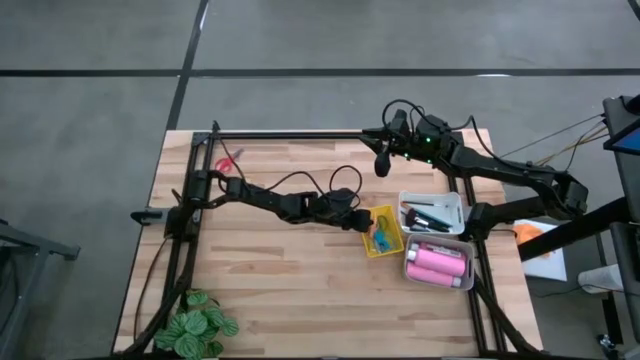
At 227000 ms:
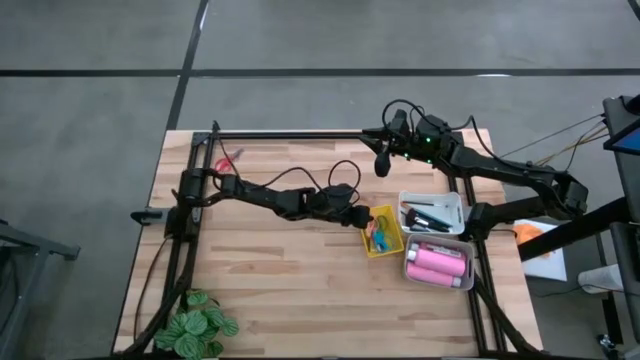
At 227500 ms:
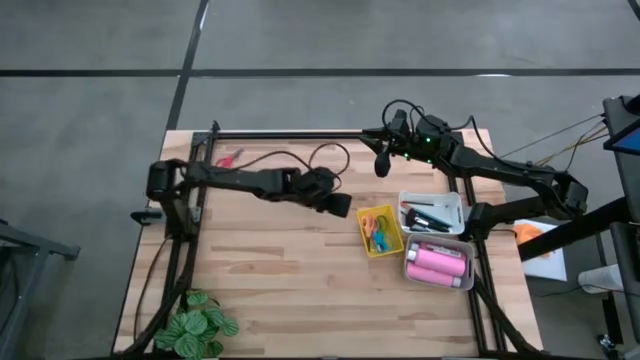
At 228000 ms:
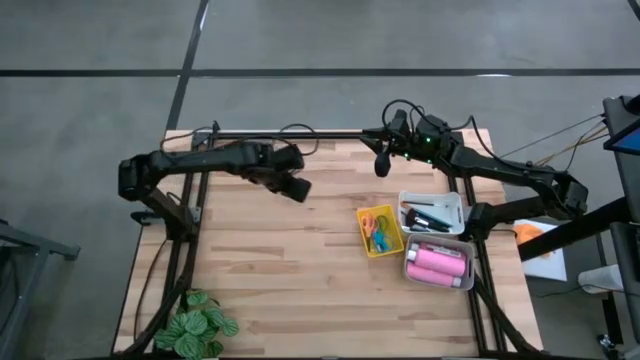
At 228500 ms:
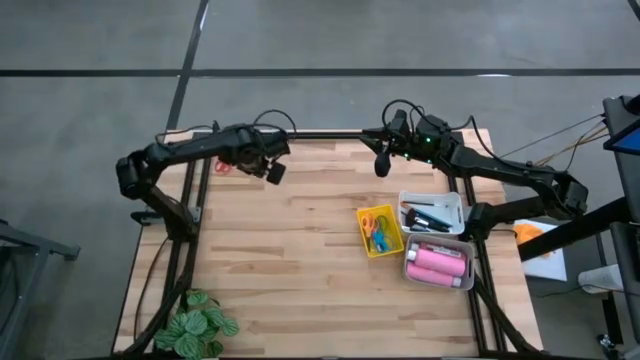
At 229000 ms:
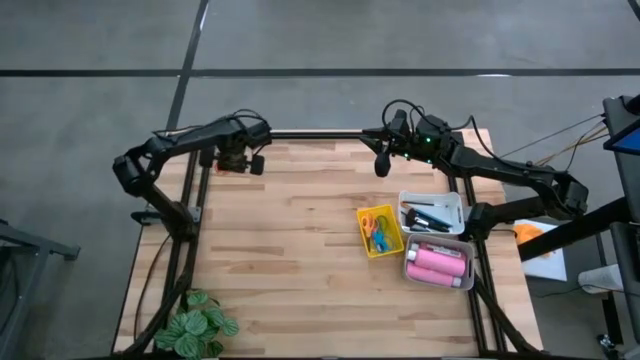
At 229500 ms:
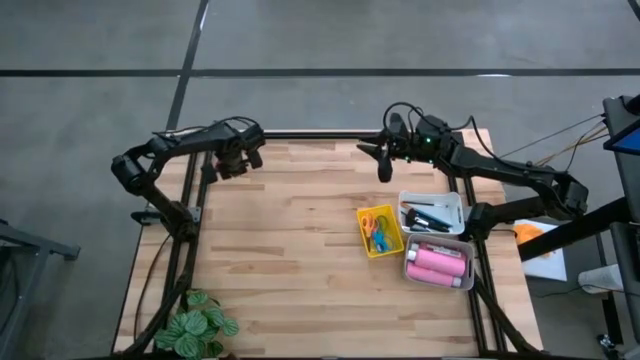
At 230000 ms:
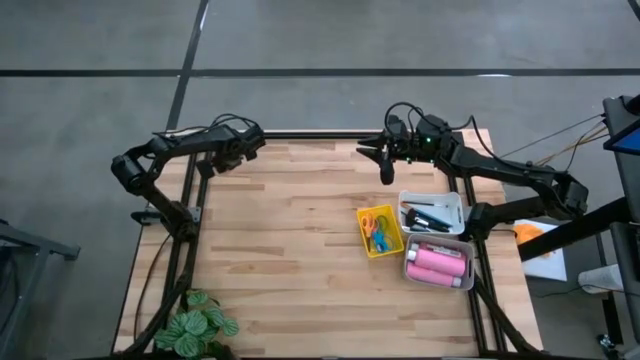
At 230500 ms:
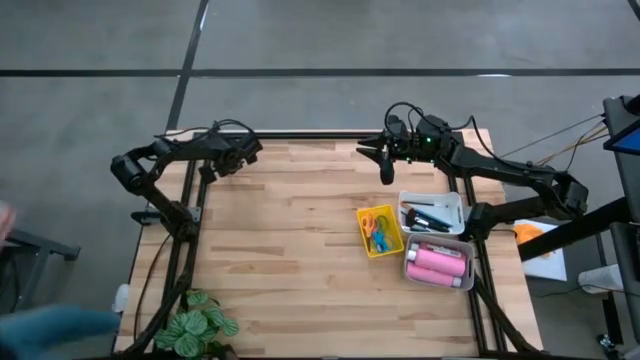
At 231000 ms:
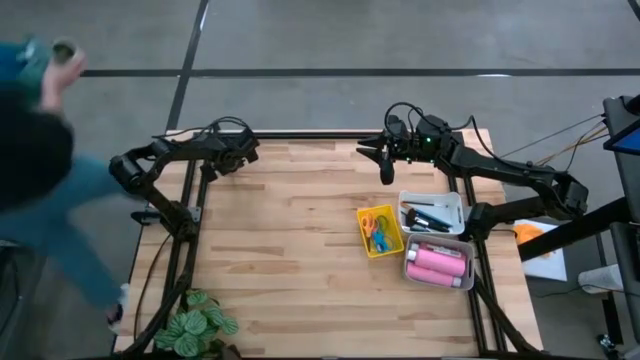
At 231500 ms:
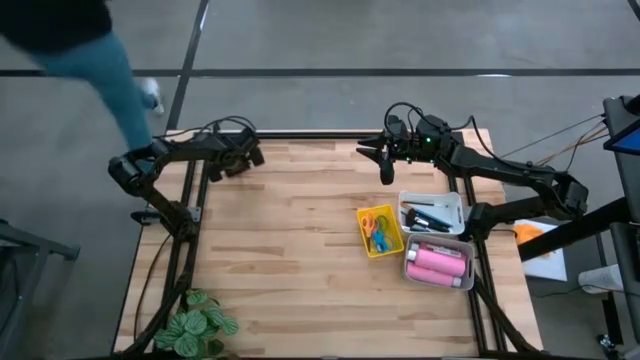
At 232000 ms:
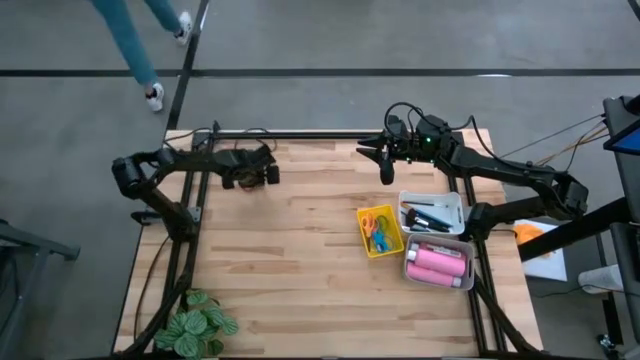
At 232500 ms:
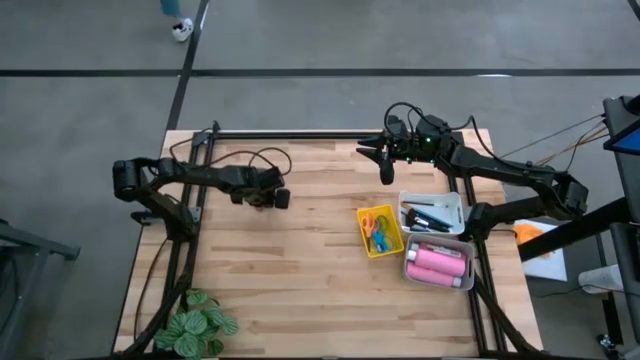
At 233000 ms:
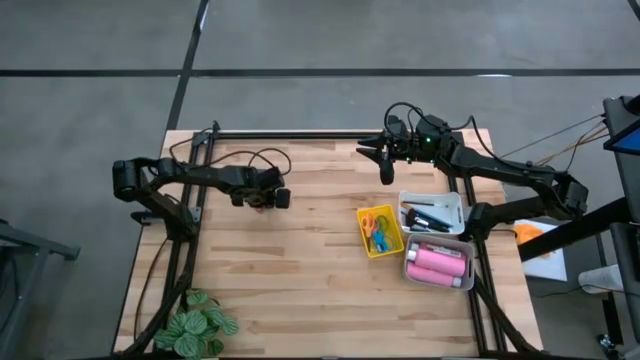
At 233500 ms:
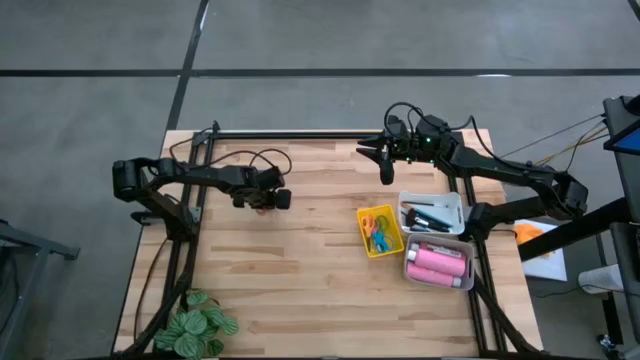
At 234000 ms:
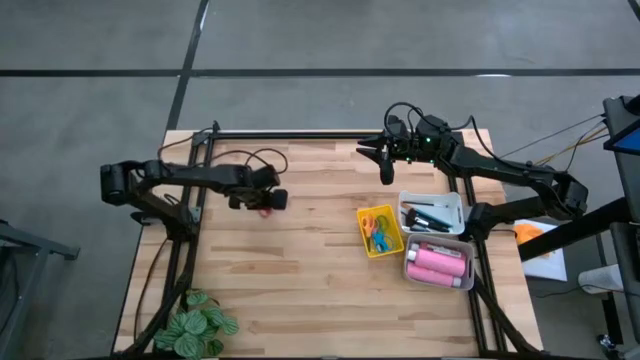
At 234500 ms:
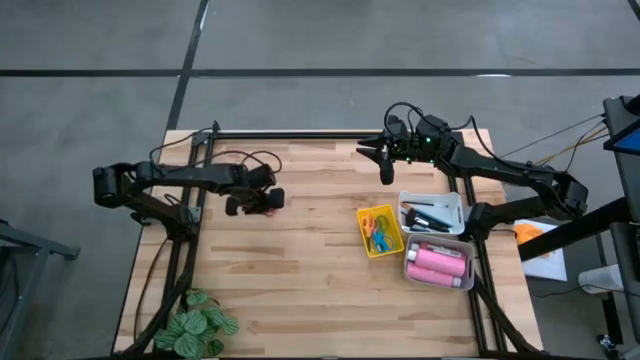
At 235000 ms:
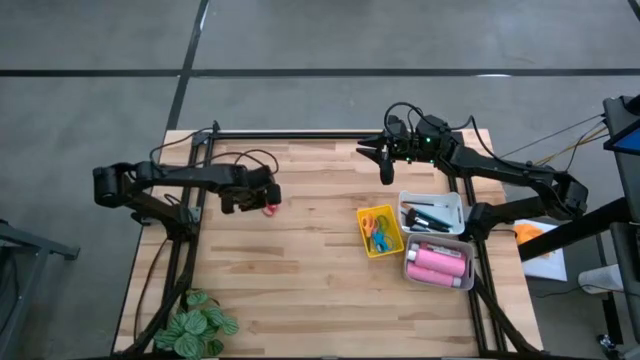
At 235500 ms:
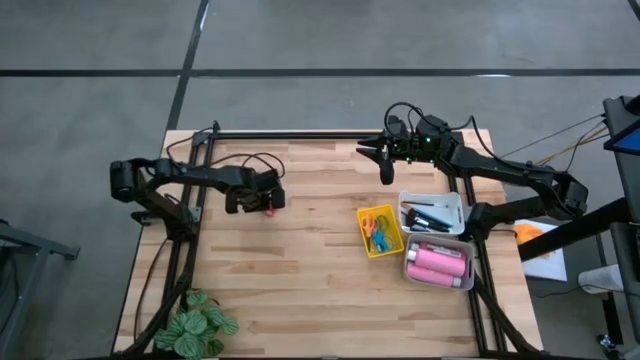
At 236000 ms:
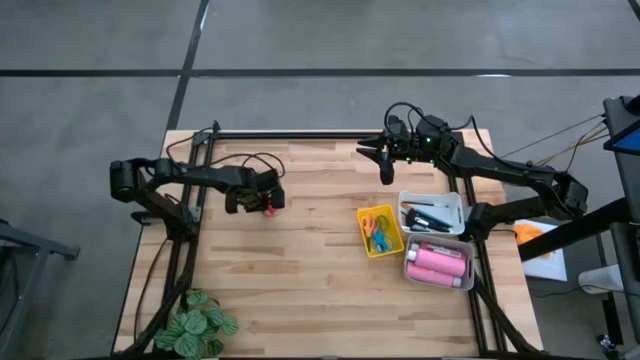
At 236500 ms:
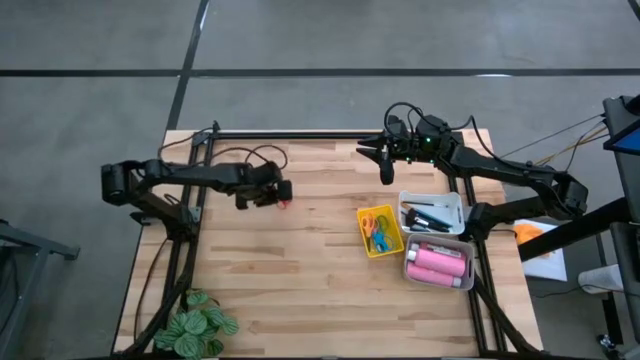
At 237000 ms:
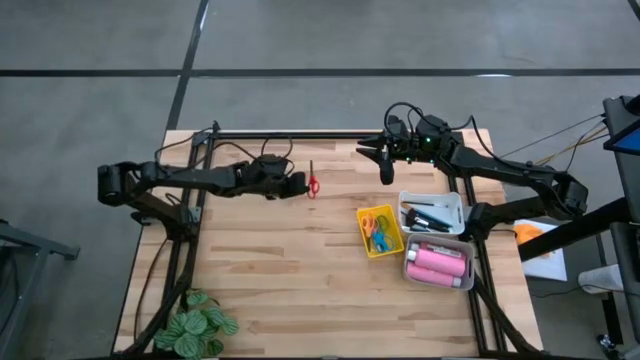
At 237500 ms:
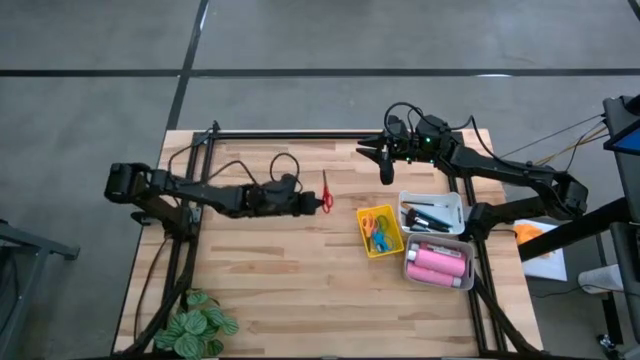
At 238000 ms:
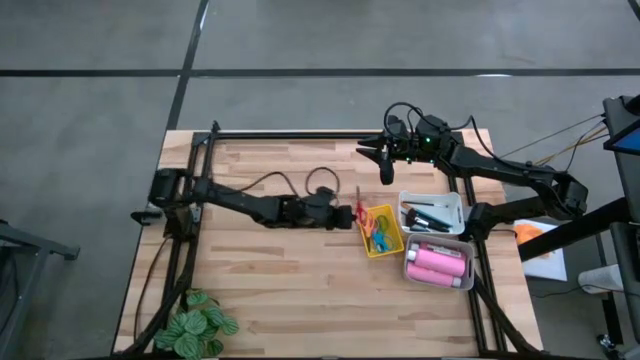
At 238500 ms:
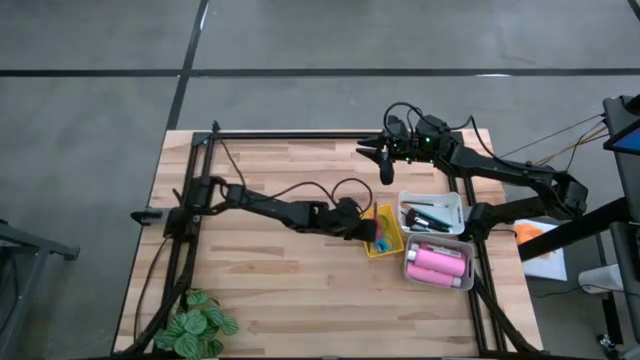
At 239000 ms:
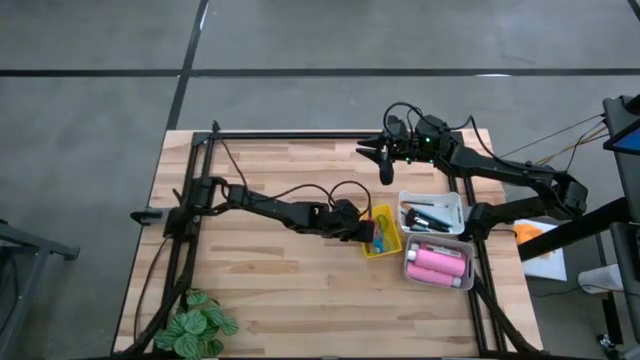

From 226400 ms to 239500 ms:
Task: Pick & Place Paint Supplies
Put the red scissors into the yellow bin

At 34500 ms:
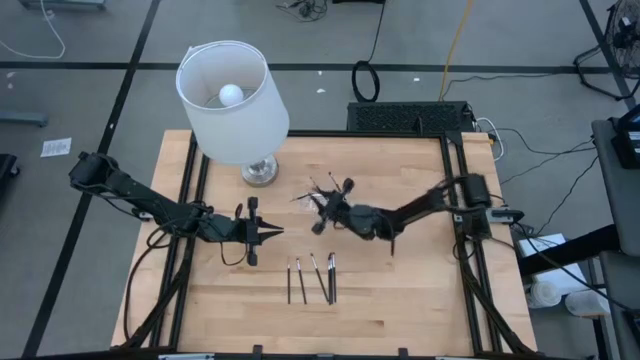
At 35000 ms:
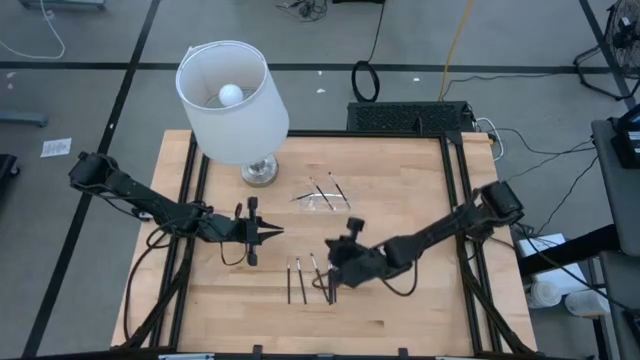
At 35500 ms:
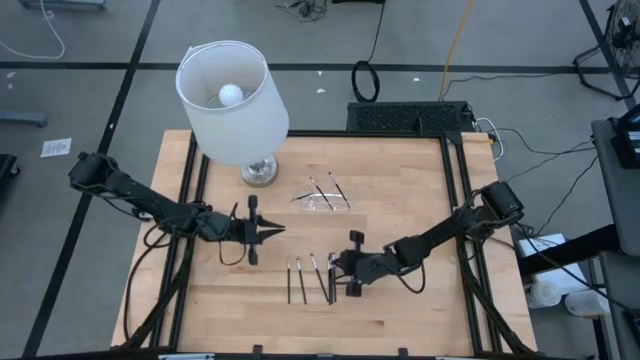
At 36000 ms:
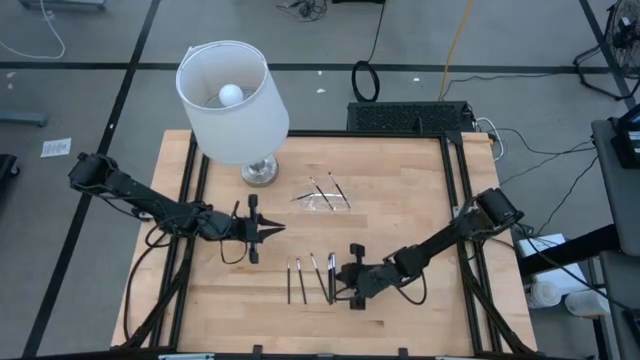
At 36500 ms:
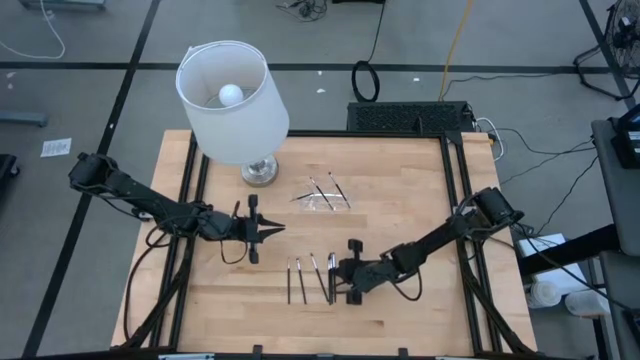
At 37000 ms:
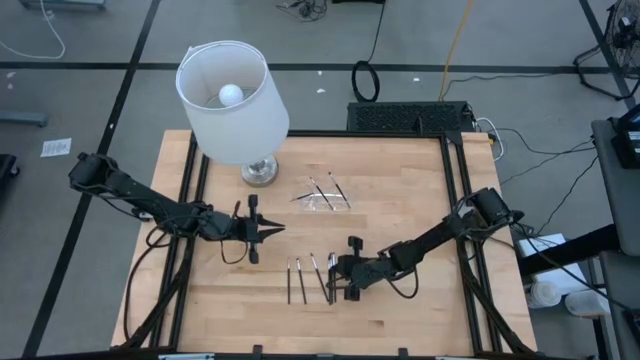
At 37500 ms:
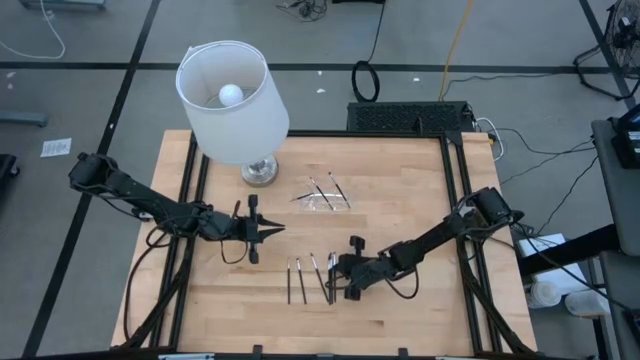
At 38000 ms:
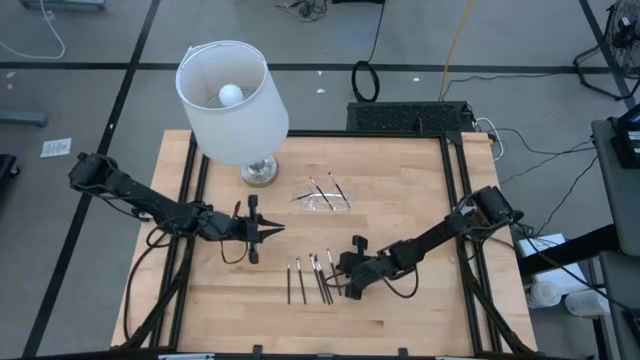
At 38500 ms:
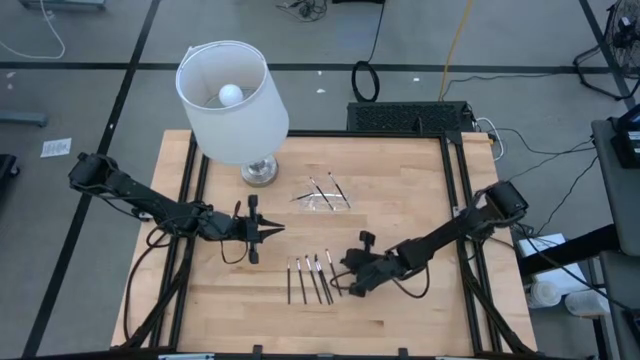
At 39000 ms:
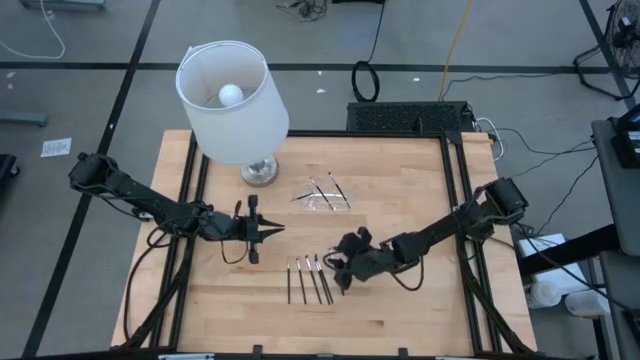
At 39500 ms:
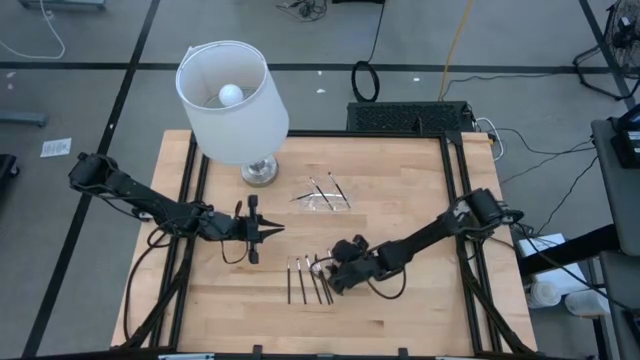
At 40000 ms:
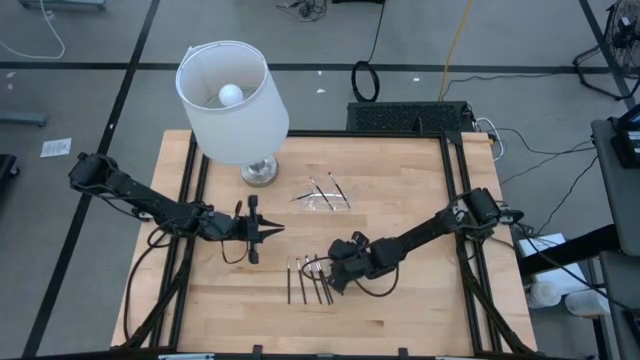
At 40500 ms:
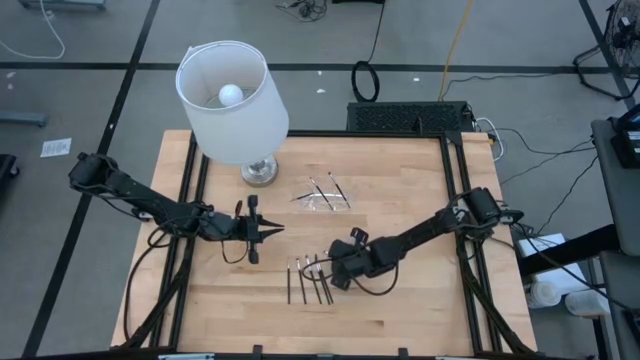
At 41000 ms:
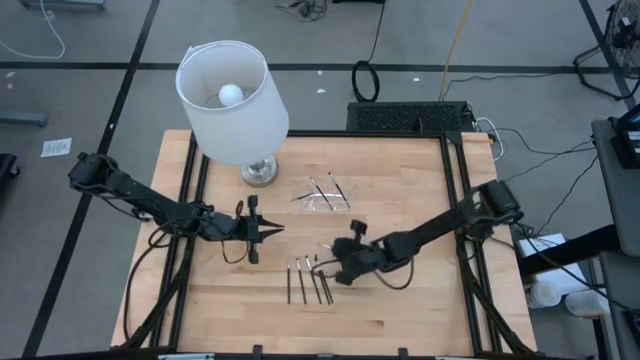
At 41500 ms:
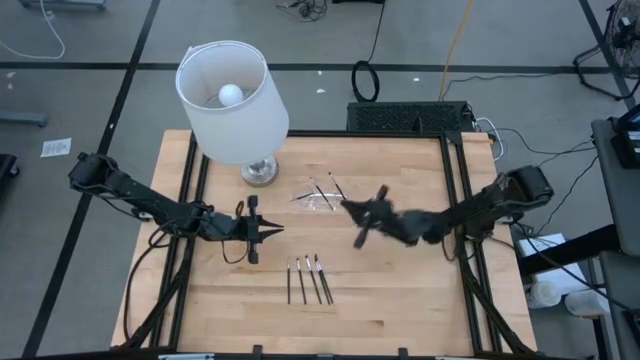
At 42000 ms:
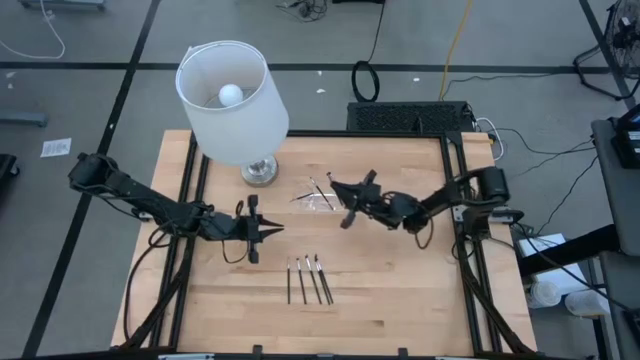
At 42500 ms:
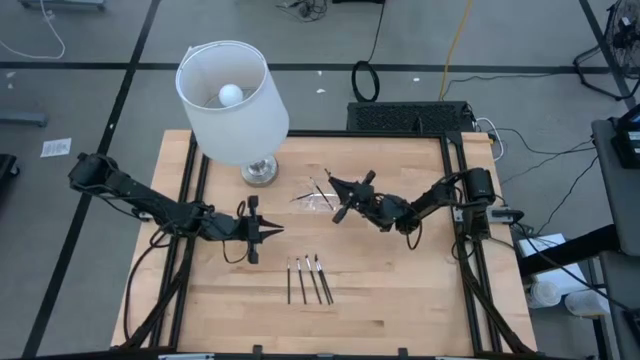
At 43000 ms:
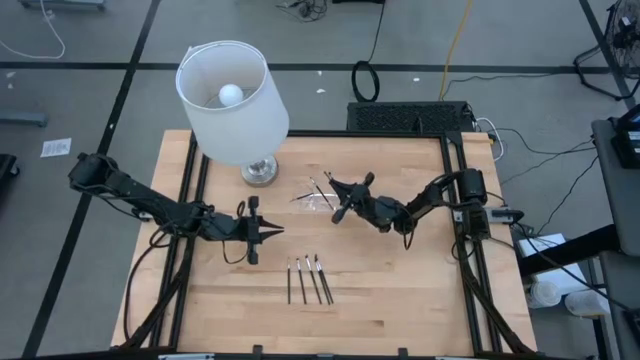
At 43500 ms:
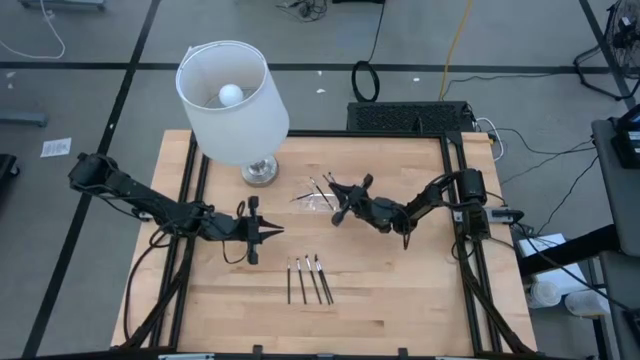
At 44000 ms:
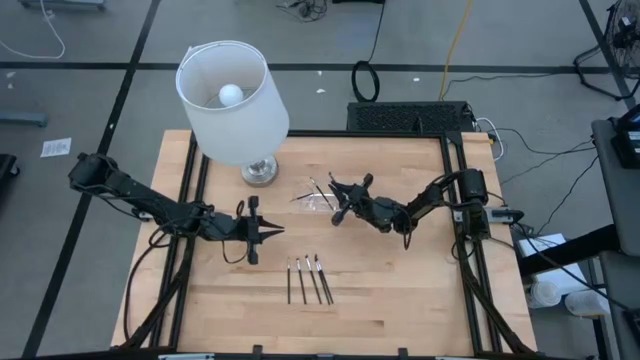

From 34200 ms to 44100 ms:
Task: Put items in baskets/containers
Put the black eyeshadow brush into the transparent organizer
